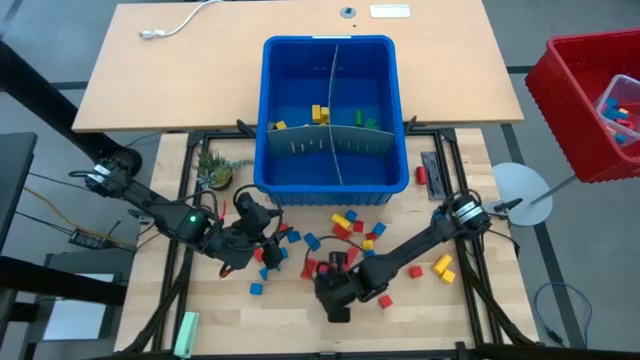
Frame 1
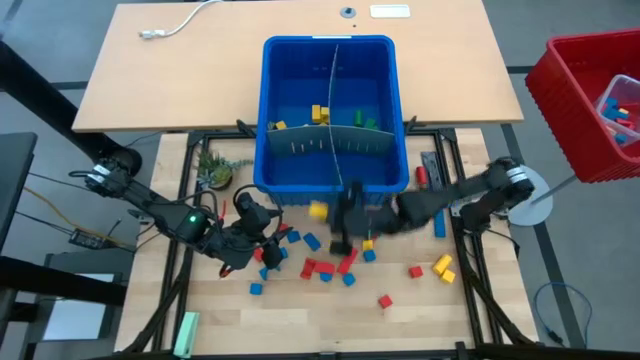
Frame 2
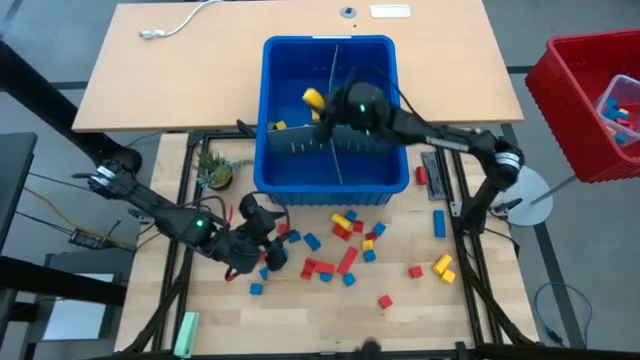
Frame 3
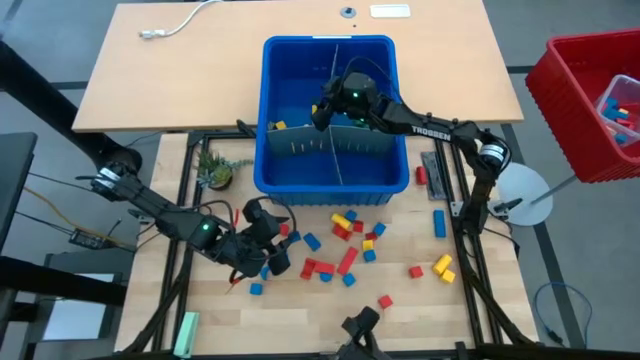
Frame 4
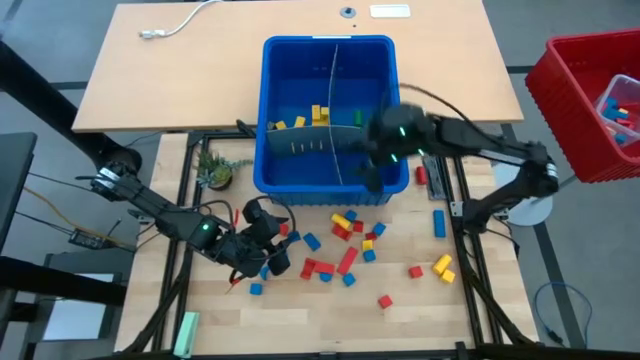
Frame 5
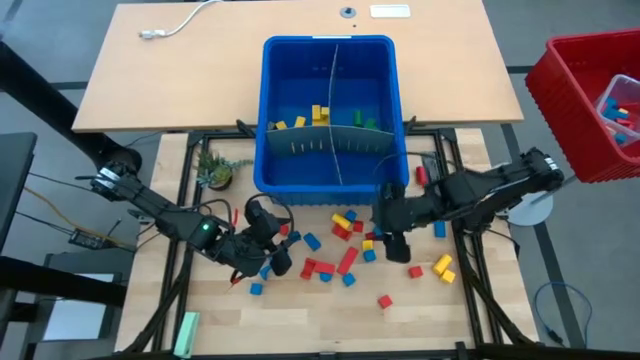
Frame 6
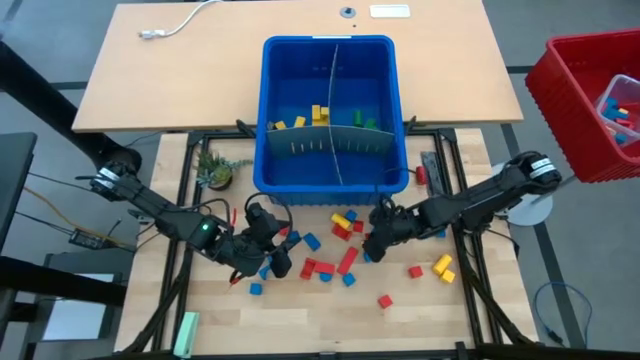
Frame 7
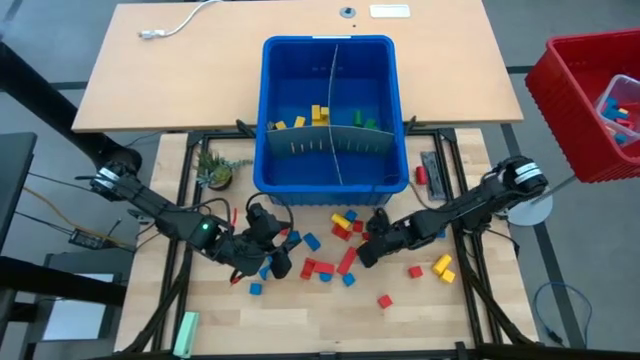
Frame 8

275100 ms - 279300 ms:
Task: Sort blocks
Put the yellow block with the other yellow blocks into the blue bin

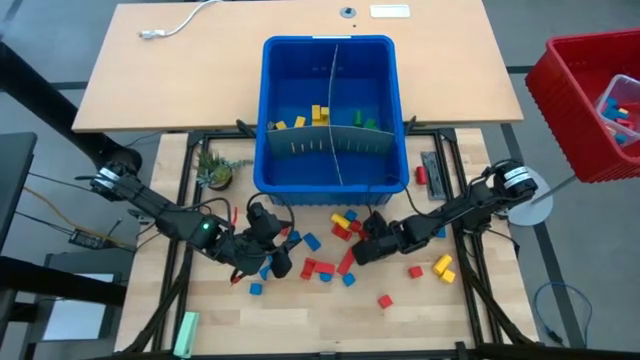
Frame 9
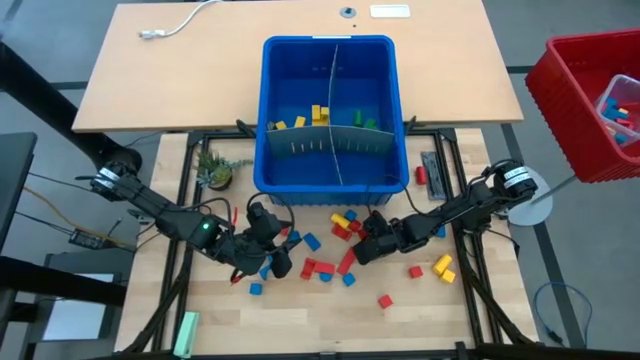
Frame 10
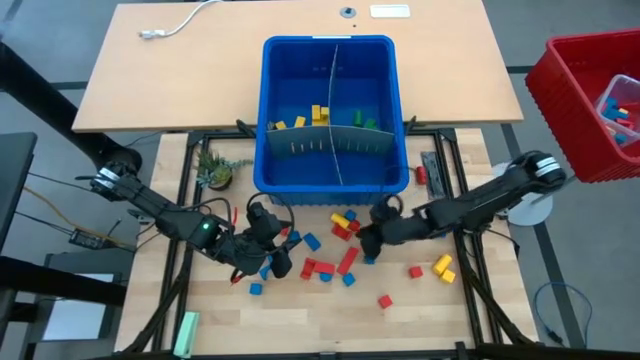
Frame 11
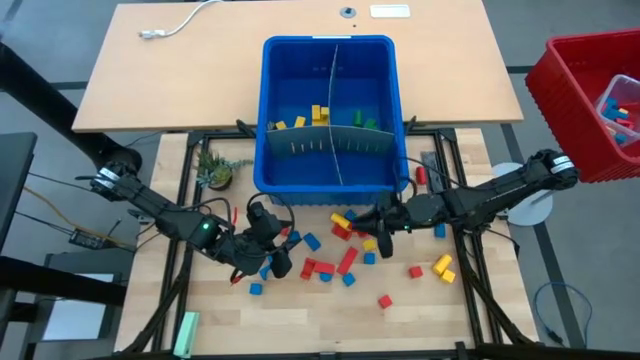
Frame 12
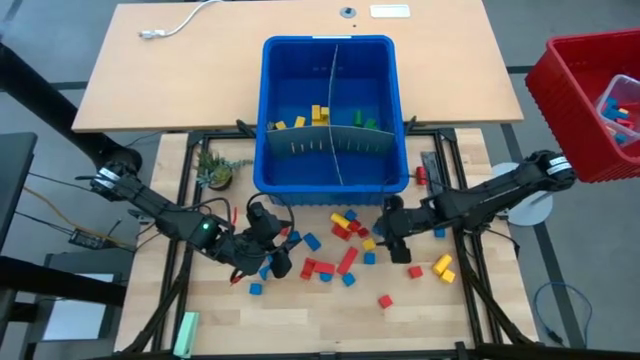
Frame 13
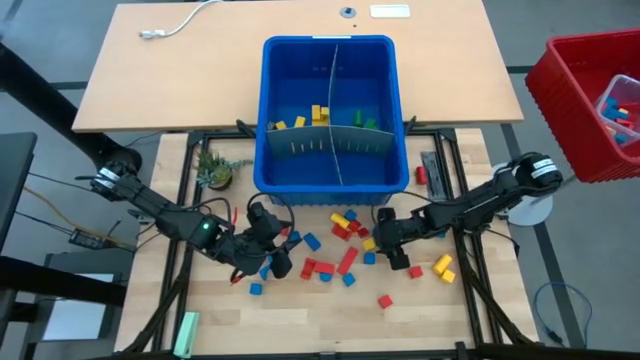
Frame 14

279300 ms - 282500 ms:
Put the yellow block with the other yellow blocks into the blue bin

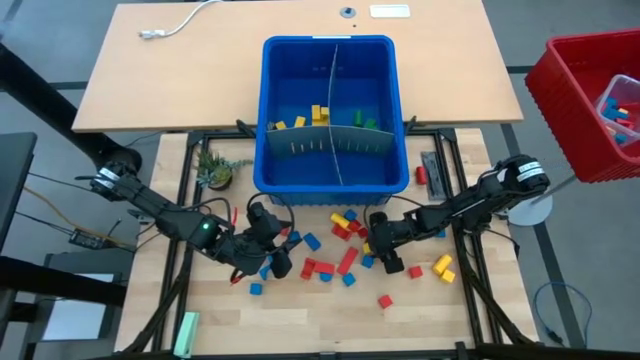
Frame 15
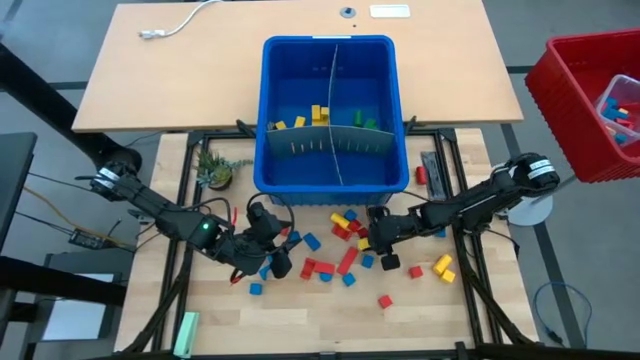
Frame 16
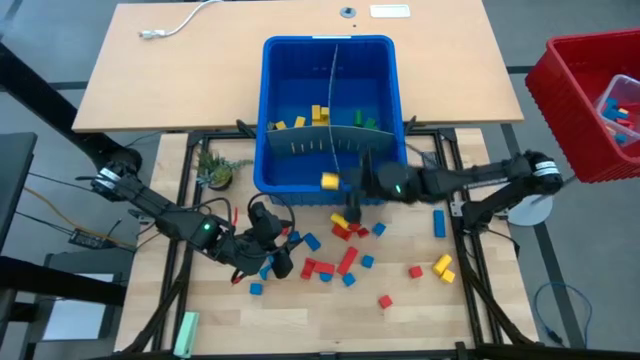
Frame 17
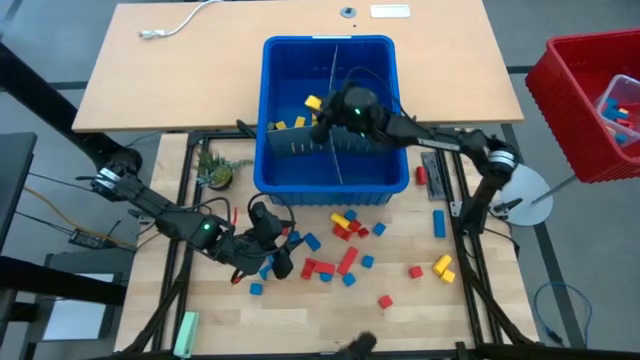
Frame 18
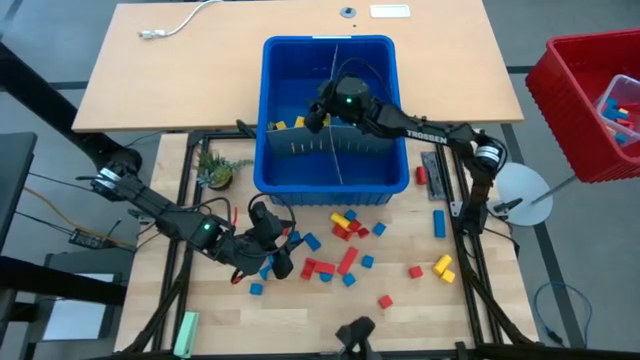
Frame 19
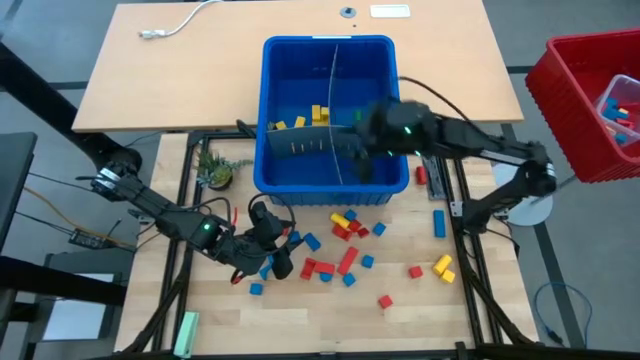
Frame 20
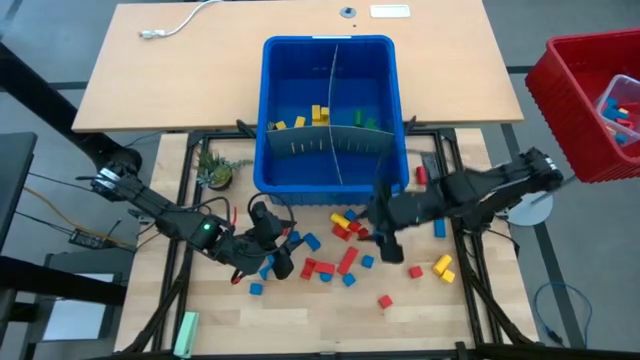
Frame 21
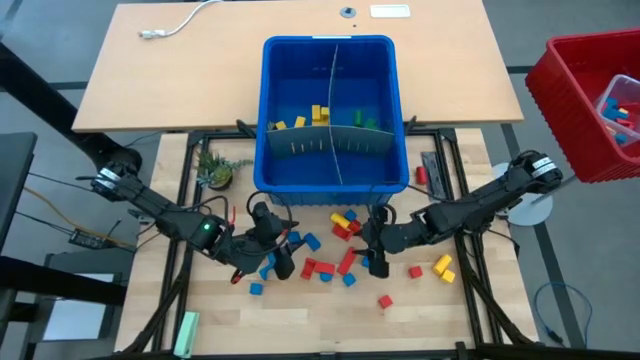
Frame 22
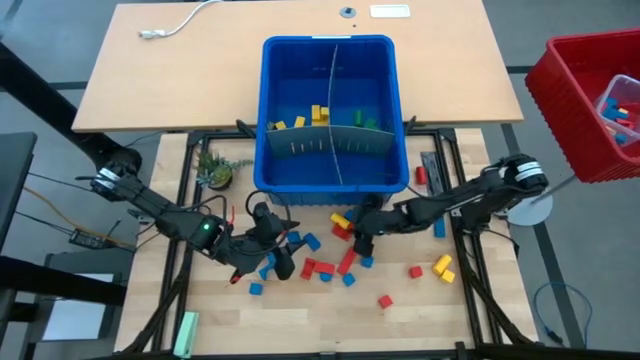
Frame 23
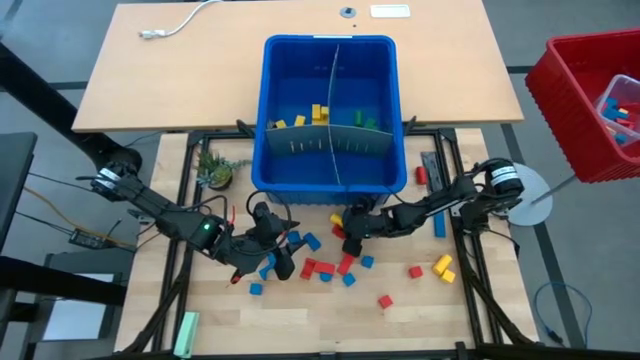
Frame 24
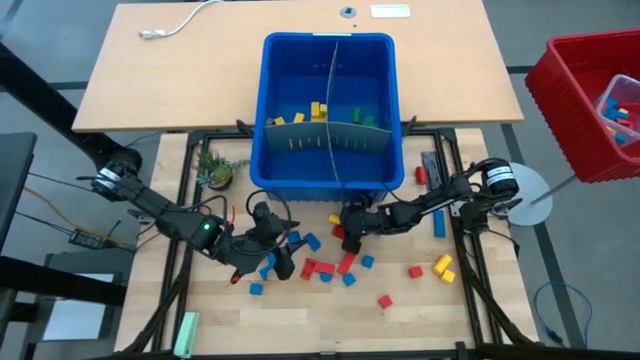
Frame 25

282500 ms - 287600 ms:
Put the yellow block with the other yellow blocks into the blue bin

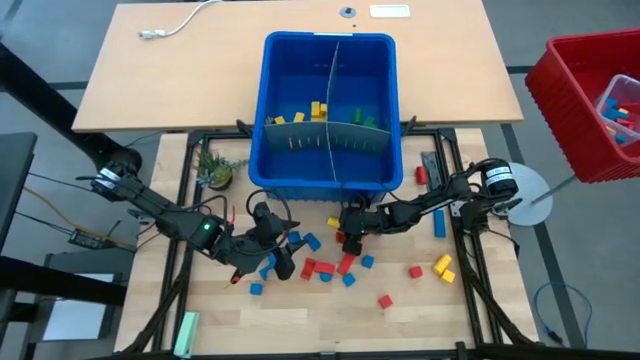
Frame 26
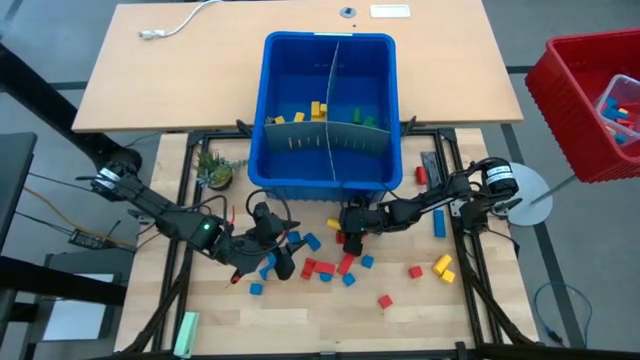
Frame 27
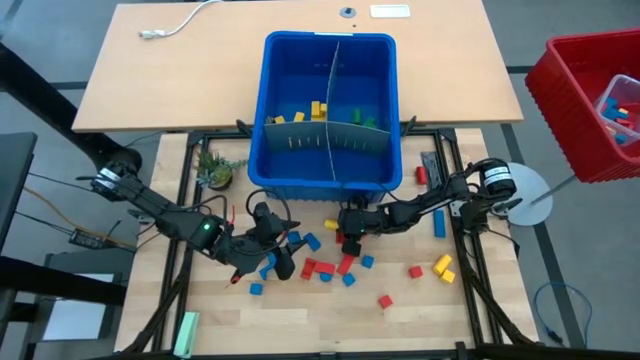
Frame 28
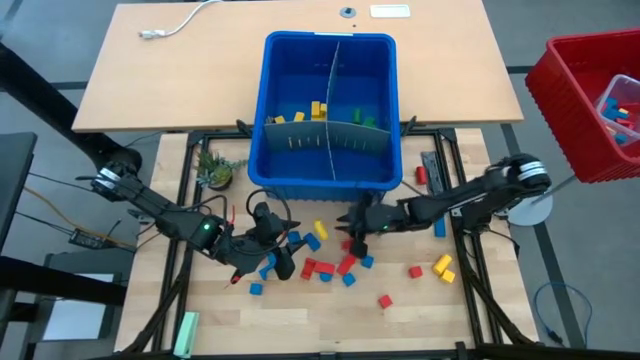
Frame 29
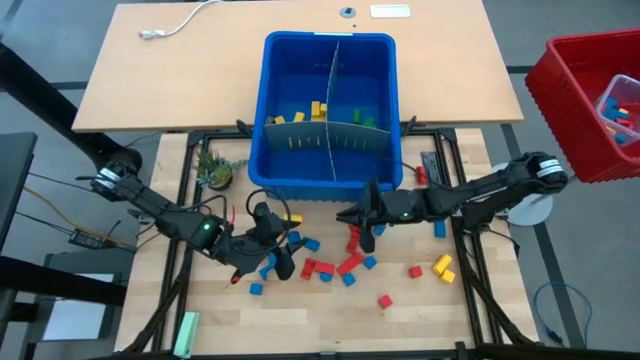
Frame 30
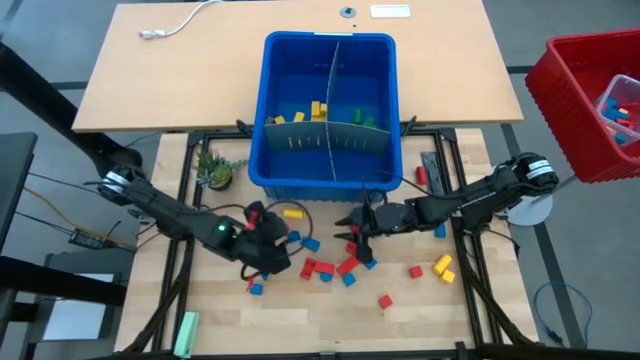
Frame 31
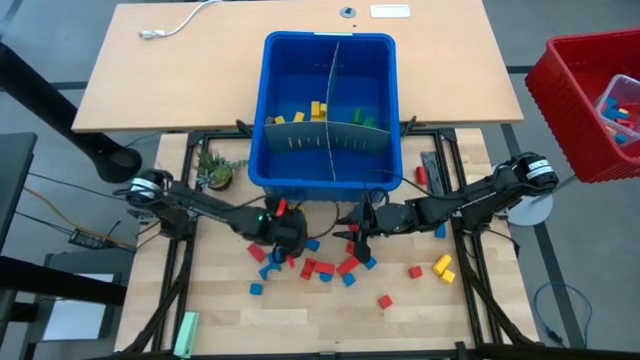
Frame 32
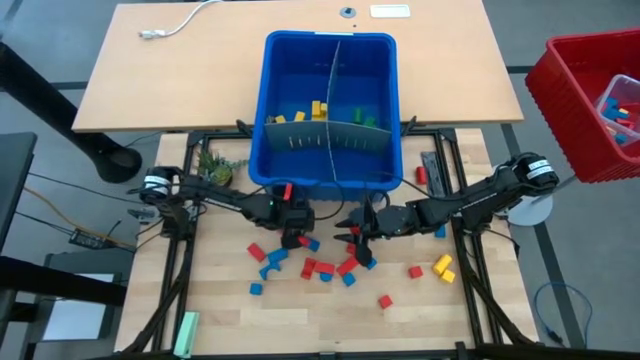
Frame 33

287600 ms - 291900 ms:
Put the yellow block with the other yellow blocks into the blue bin

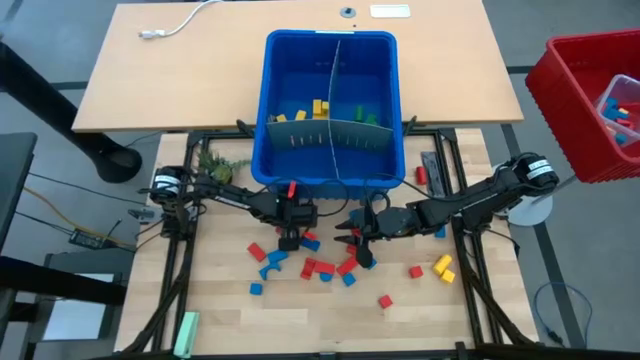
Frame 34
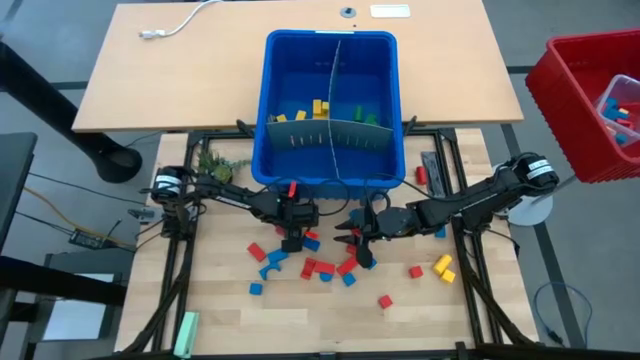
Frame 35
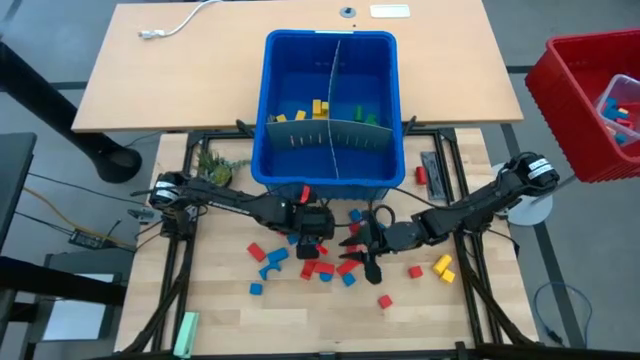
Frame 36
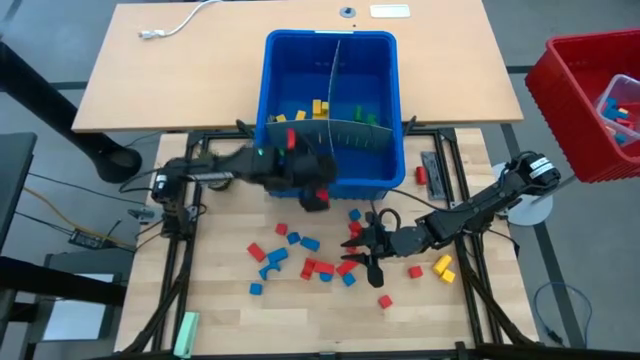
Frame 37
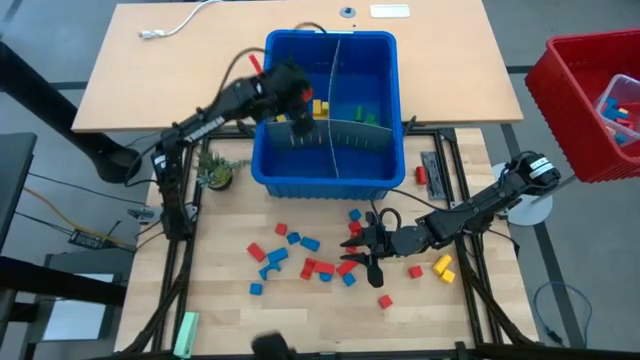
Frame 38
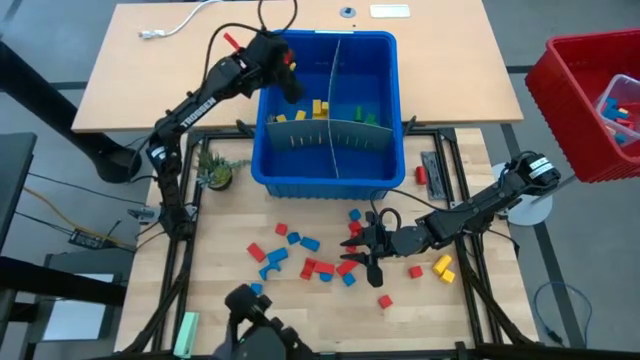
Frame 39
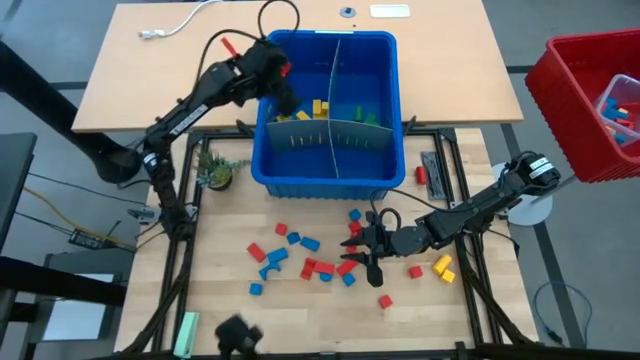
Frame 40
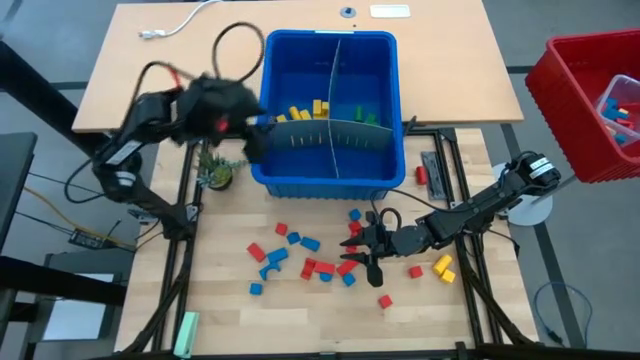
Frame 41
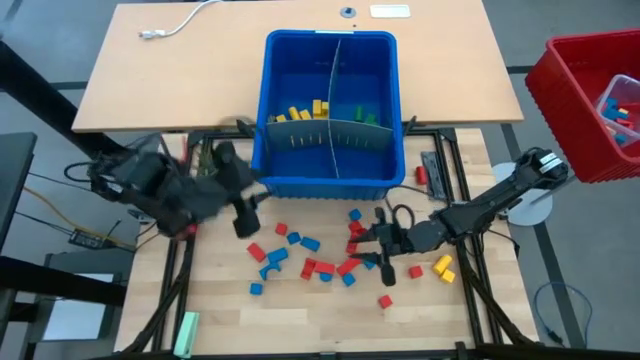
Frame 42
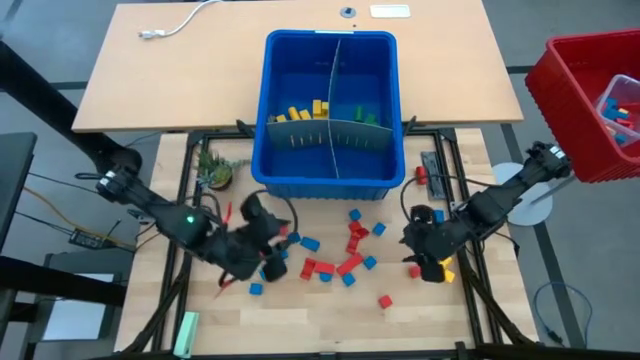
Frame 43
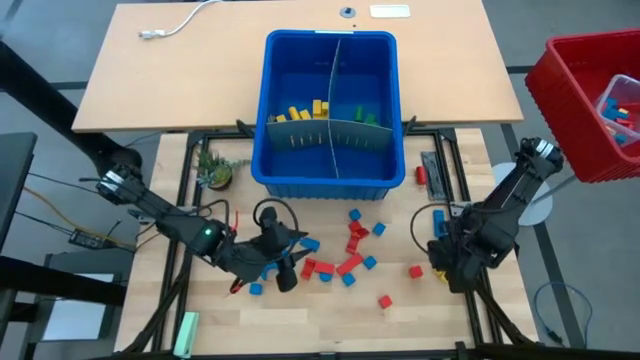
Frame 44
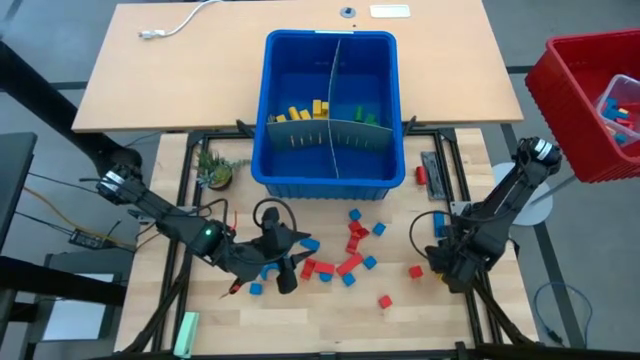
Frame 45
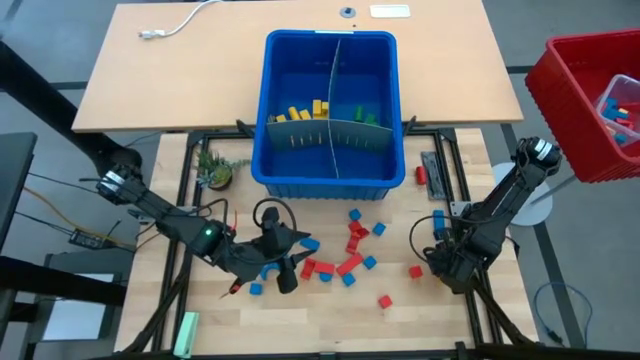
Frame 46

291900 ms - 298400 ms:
Put the yellow block with the other yellow blocks into the blue bin
